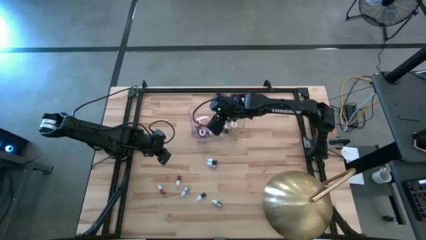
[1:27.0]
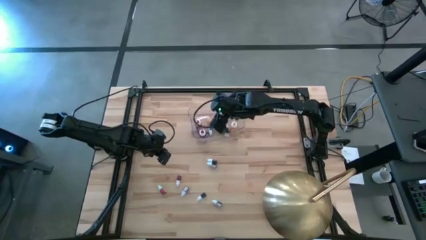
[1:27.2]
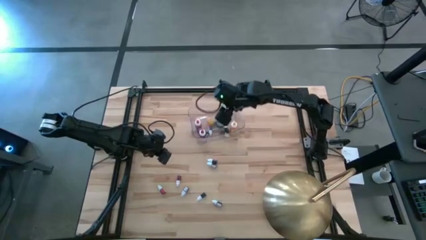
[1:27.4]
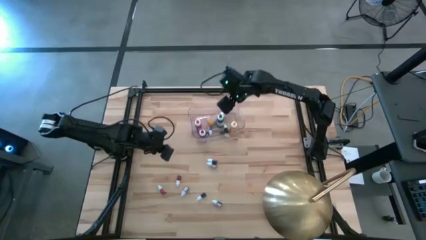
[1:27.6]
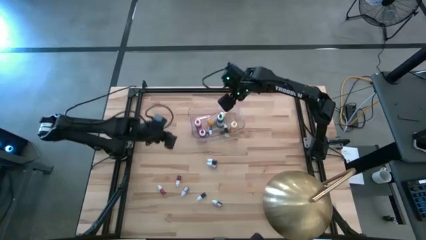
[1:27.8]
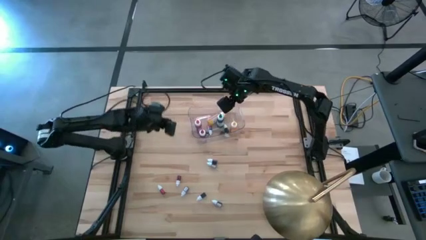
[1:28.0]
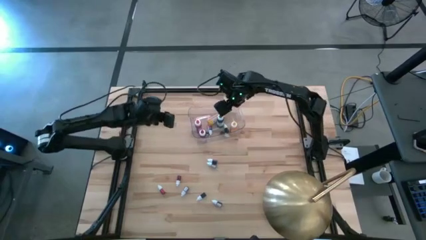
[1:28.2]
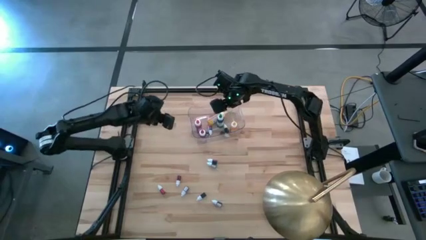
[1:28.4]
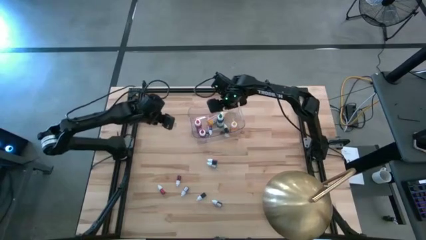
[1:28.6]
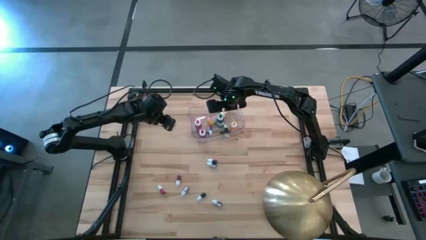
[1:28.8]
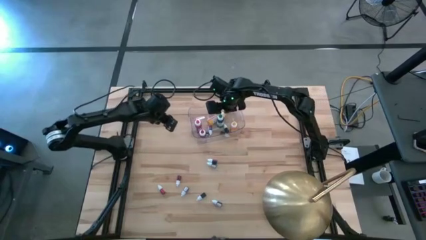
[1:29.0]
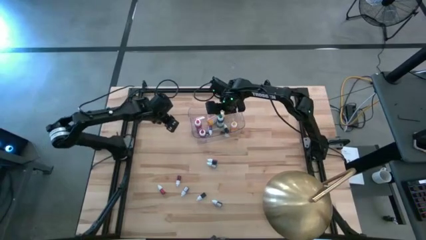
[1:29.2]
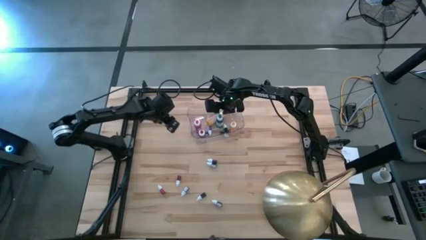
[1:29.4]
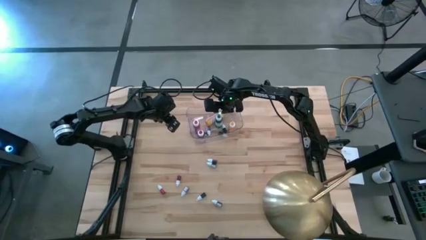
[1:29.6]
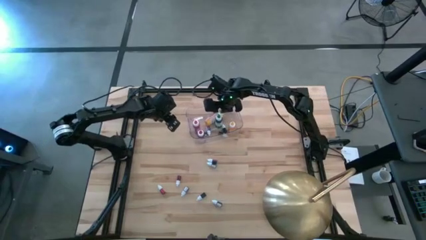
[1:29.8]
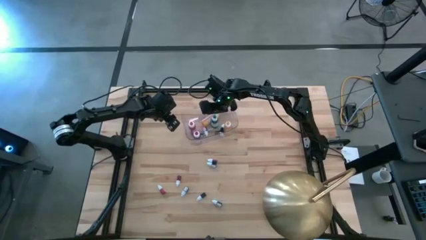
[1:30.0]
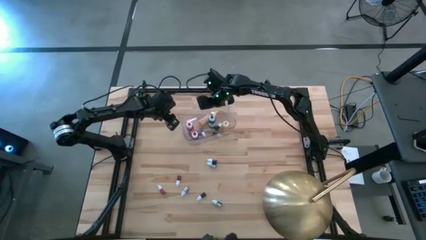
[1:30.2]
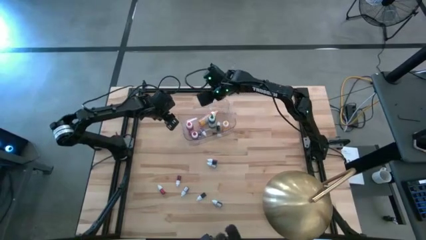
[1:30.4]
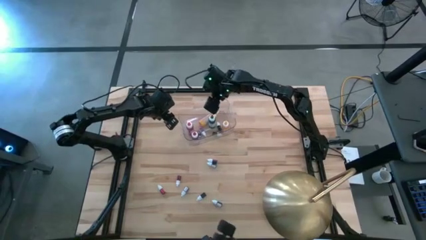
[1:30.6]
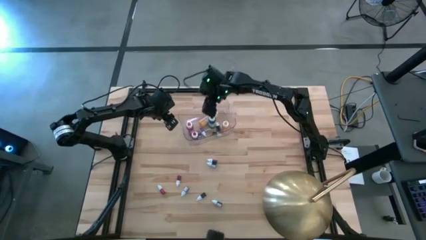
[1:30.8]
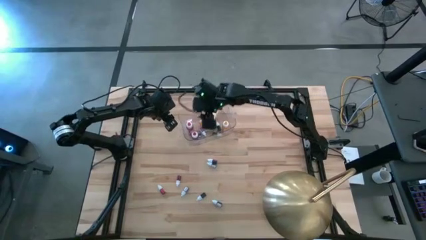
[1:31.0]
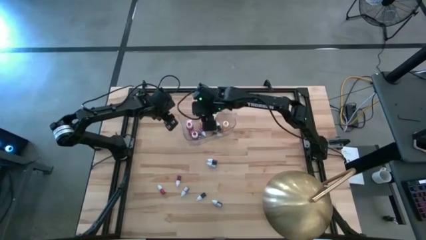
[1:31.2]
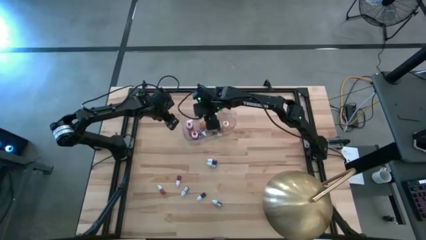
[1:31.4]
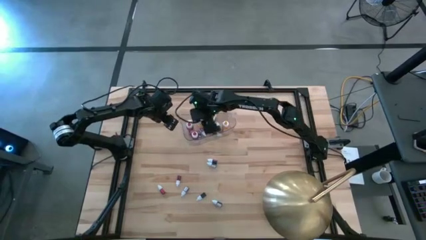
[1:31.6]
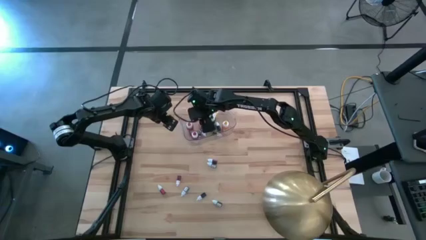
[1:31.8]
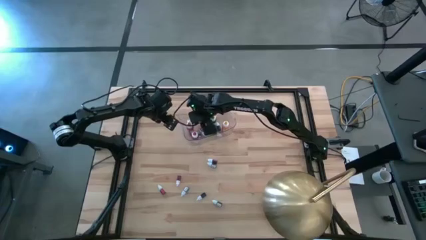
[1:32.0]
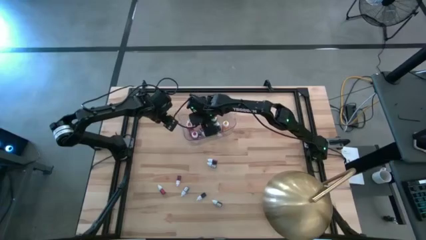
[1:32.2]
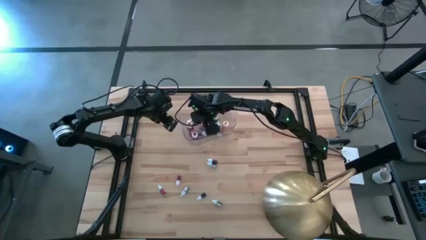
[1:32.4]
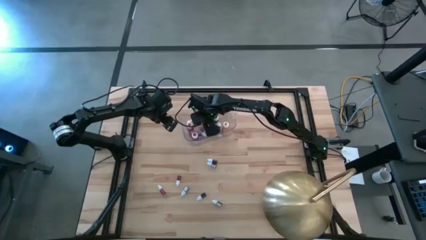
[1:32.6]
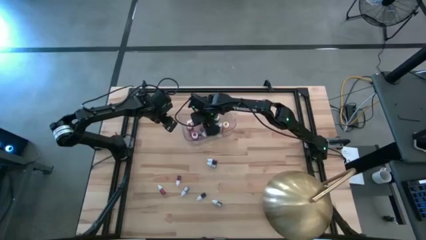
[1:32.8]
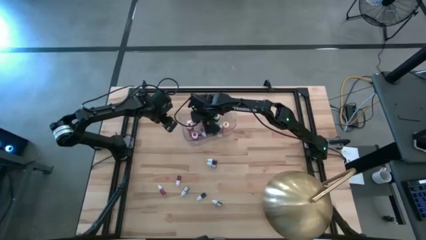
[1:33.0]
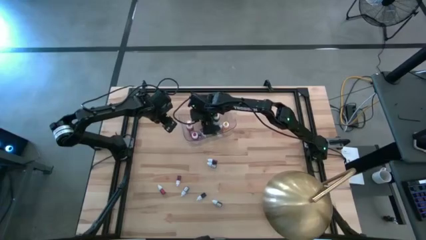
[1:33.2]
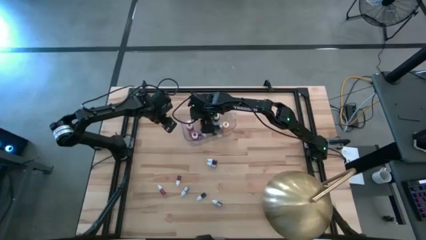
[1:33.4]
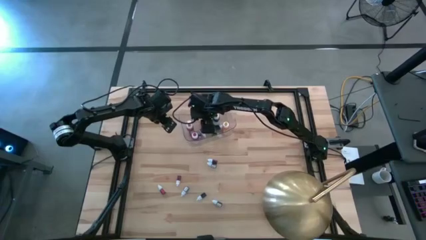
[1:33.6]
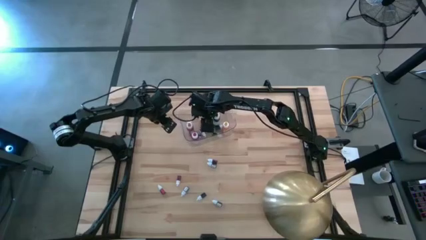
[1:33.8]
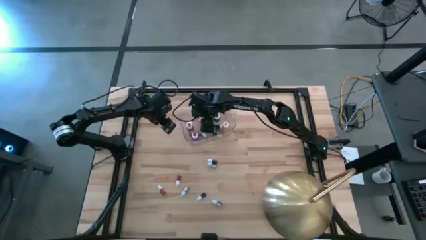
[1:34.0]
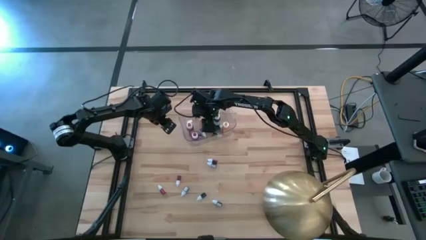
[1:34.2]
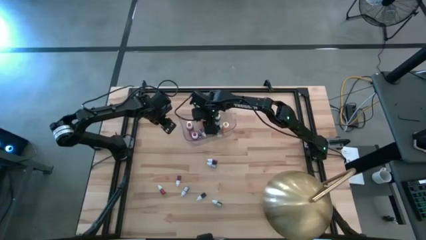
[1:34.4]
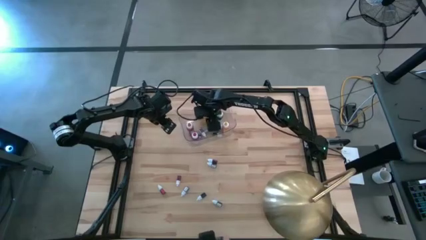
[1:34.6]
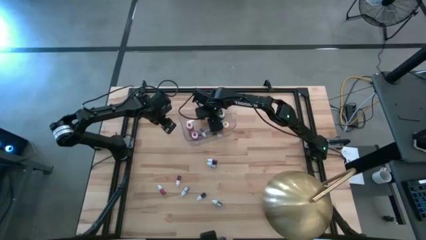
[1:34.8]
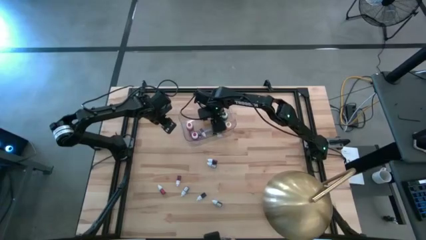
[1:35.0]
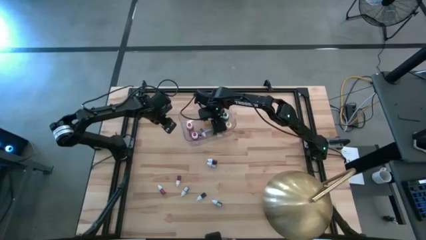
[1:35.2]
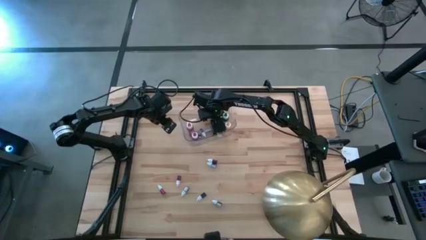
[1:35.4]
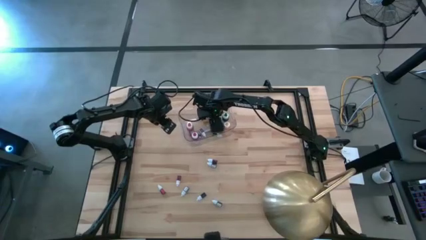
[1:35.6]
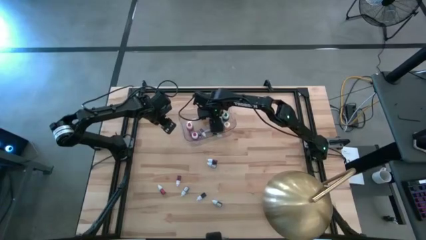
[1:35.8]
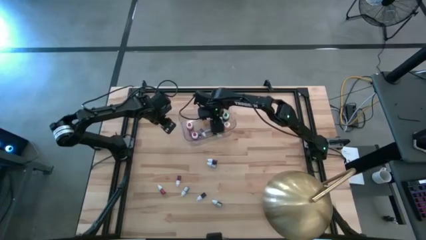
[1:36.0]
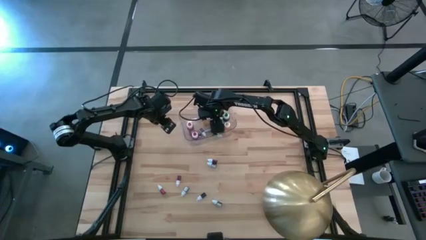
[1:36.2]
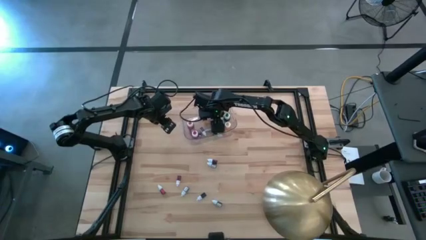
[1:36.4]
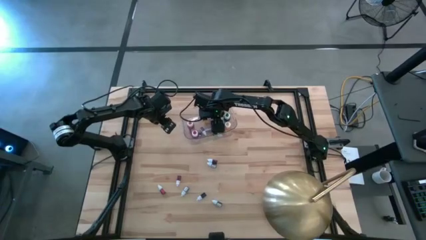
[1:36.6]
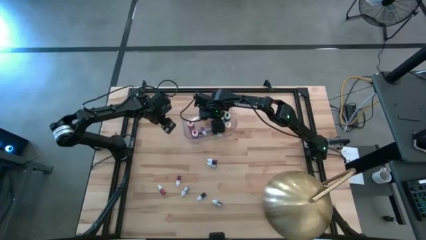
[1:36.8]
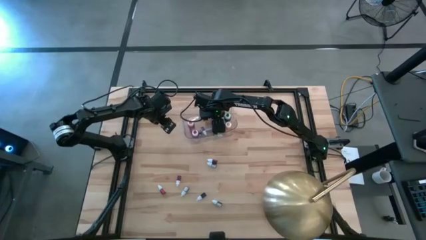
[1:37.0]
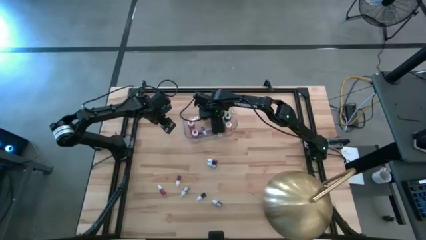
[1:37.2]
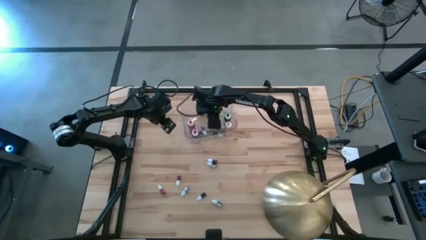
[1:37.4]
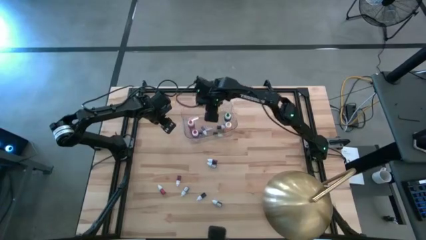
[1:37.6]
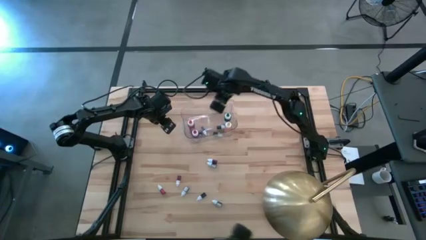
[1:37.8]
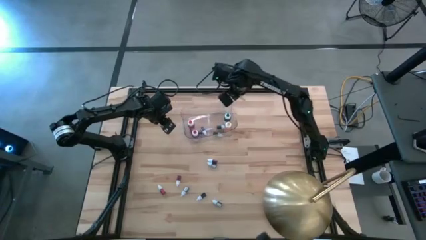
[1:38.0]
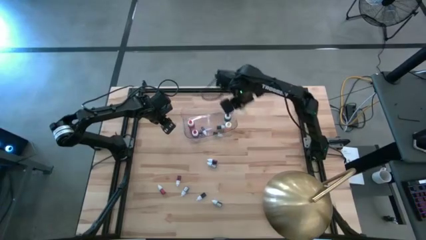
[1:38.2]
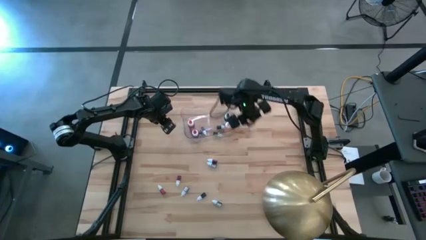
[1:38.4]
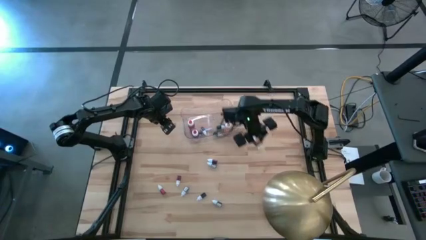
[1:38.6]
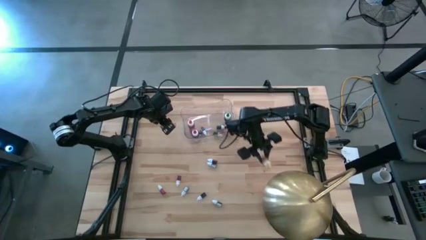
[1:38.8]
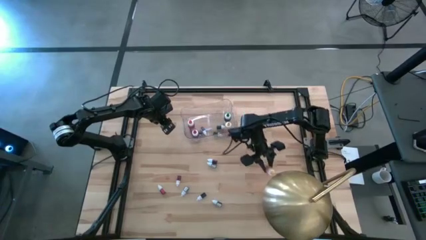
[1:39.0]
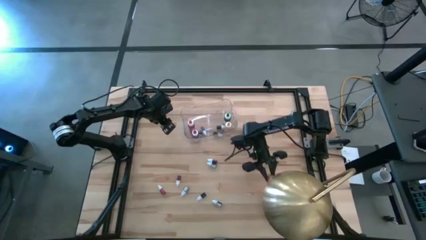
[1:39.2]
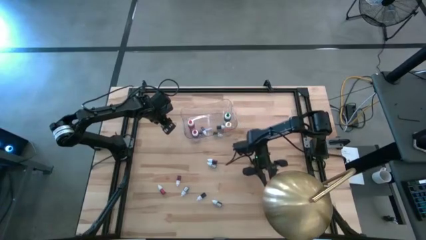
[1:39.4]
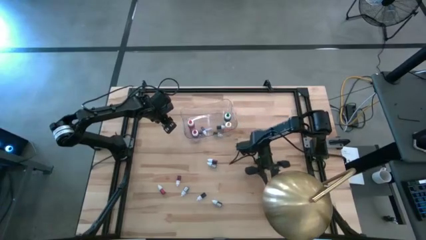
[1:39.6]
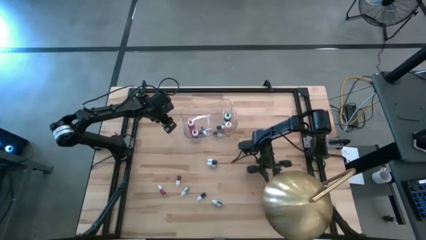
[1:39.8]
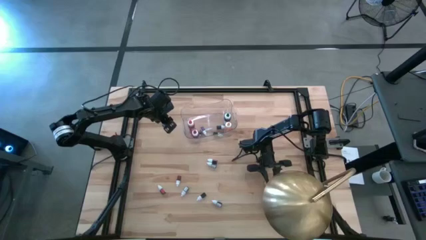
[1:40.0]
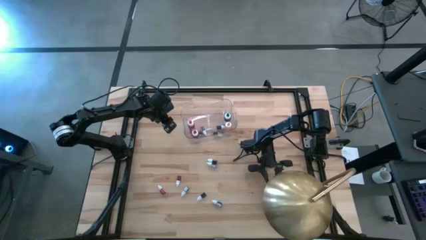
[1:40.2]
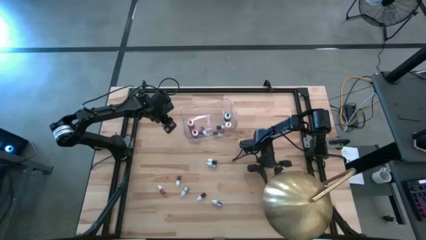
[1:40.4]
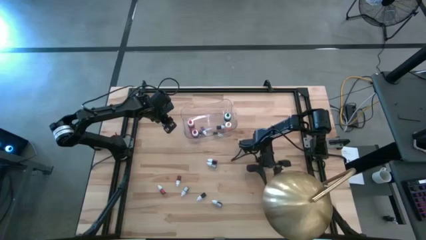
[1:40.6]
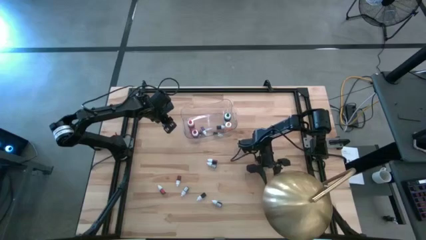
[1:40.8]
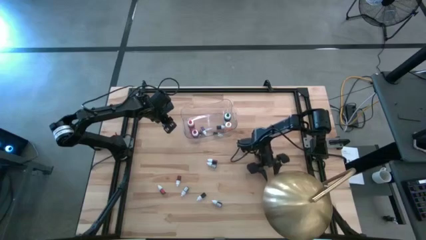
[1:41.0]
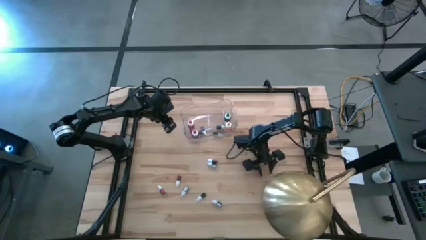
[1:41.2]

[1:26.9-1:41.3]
Task: Pick & Place food coloring
Remove the top large yellow food coloring bottle from the transparent bin
